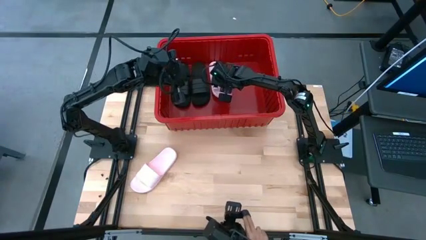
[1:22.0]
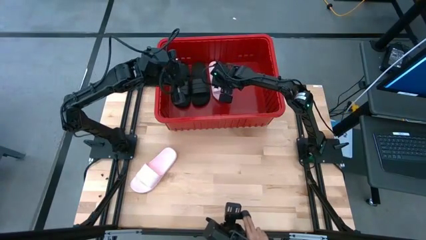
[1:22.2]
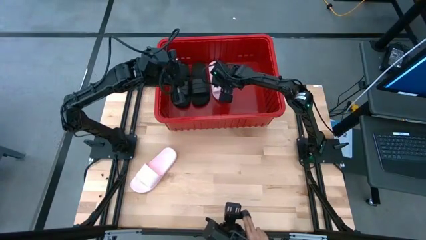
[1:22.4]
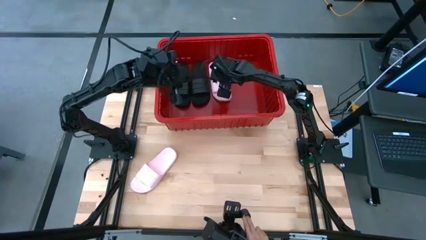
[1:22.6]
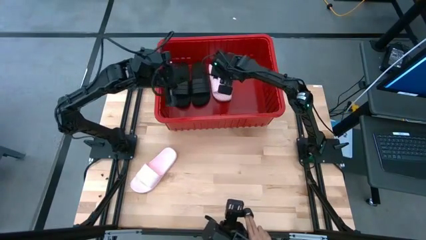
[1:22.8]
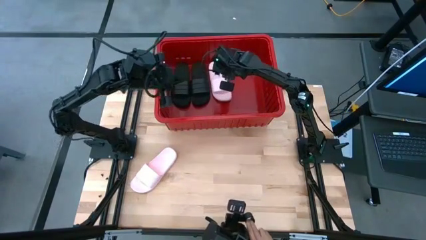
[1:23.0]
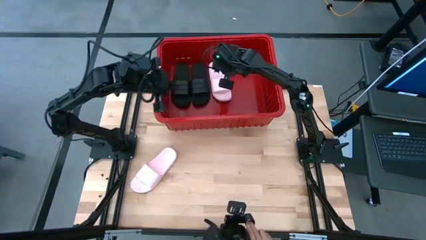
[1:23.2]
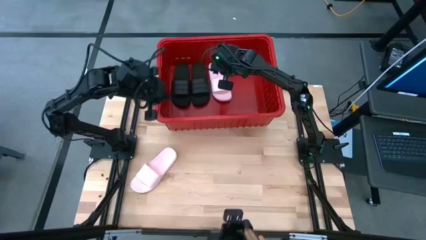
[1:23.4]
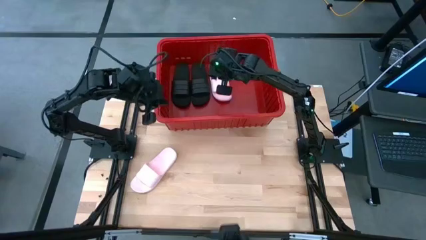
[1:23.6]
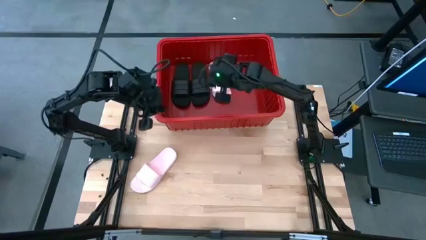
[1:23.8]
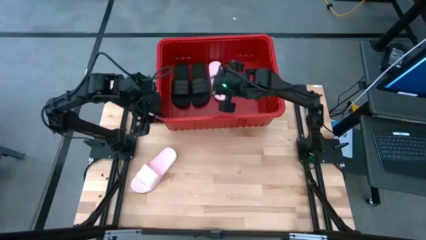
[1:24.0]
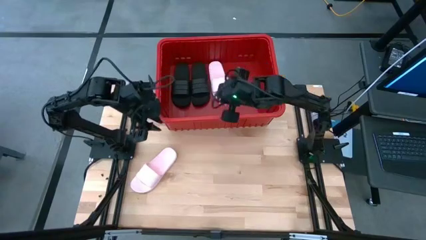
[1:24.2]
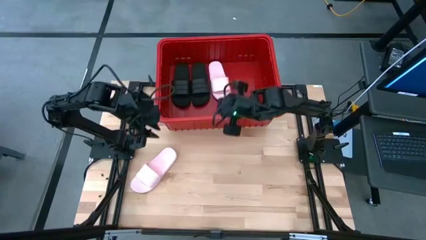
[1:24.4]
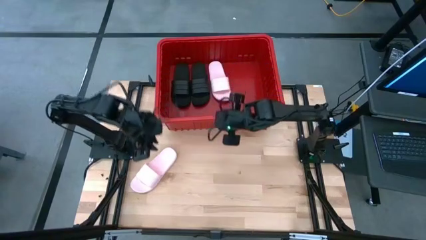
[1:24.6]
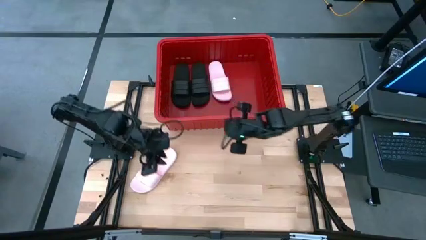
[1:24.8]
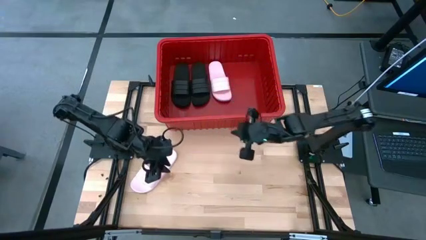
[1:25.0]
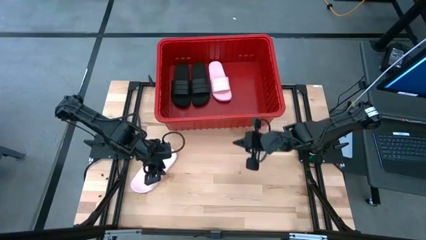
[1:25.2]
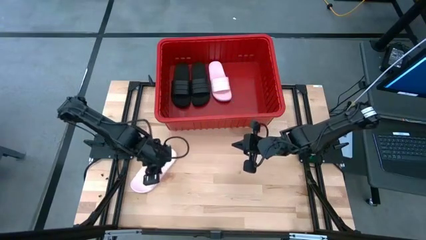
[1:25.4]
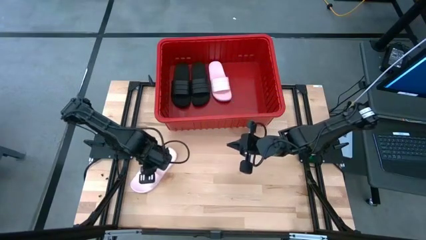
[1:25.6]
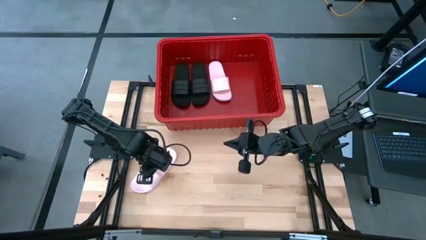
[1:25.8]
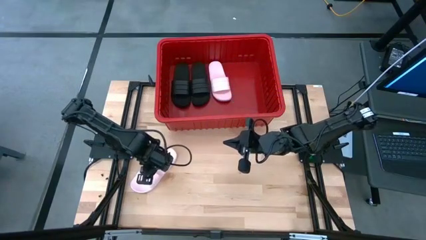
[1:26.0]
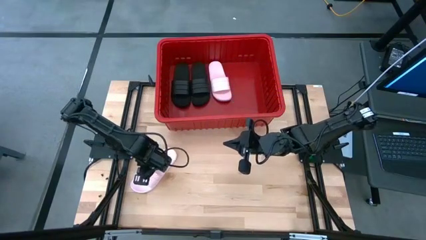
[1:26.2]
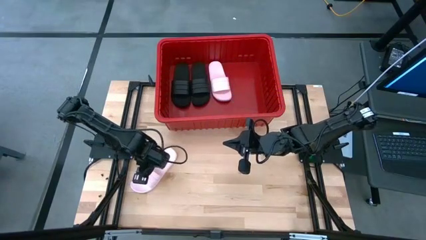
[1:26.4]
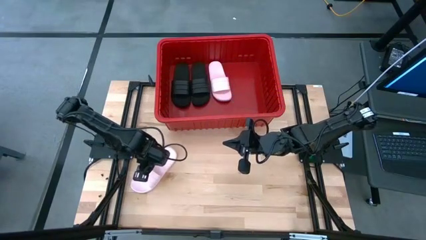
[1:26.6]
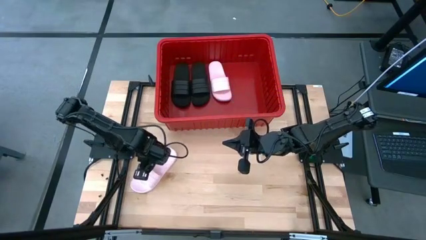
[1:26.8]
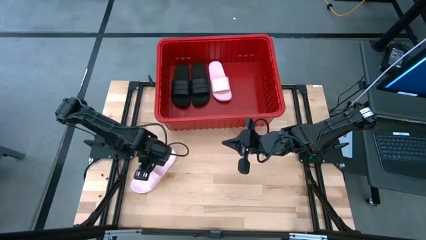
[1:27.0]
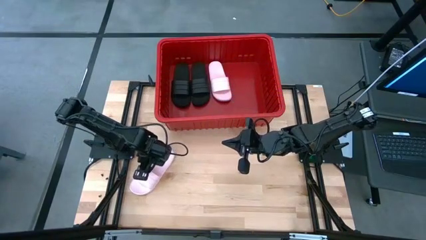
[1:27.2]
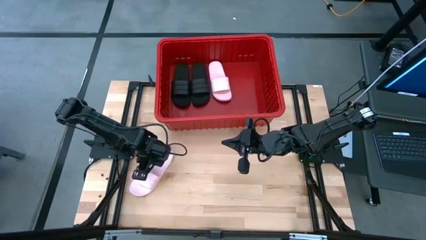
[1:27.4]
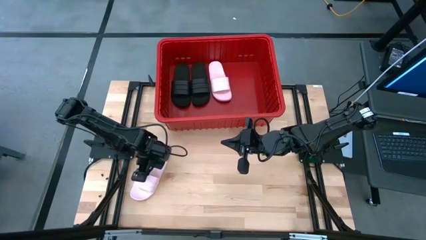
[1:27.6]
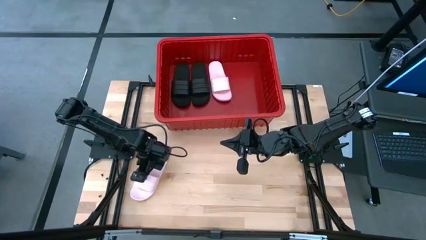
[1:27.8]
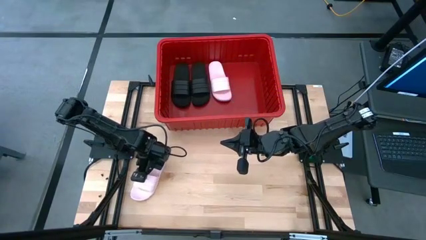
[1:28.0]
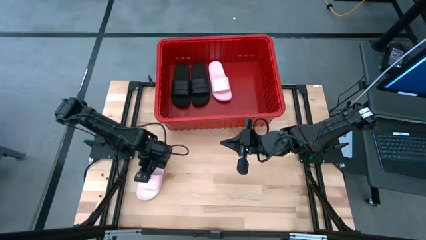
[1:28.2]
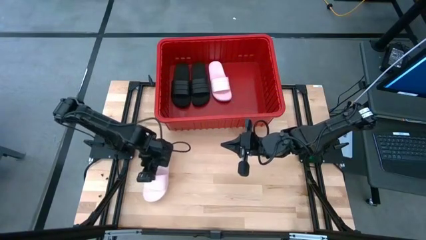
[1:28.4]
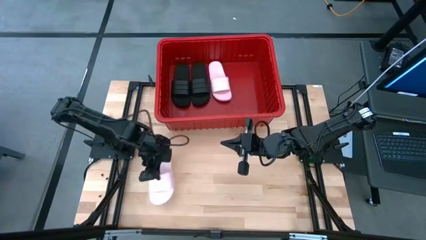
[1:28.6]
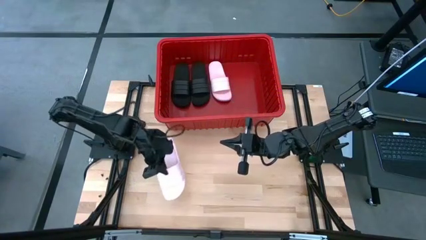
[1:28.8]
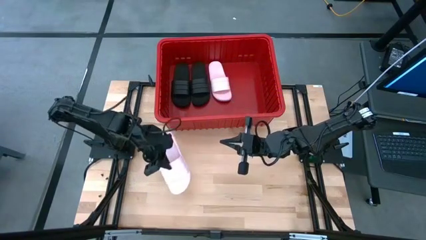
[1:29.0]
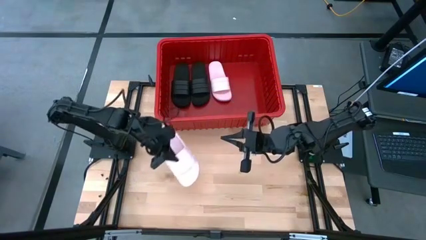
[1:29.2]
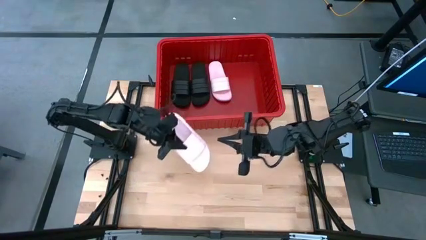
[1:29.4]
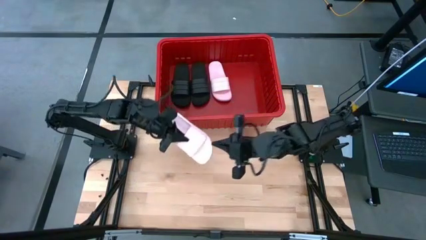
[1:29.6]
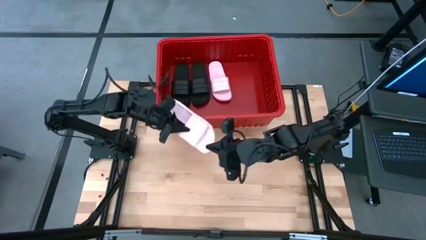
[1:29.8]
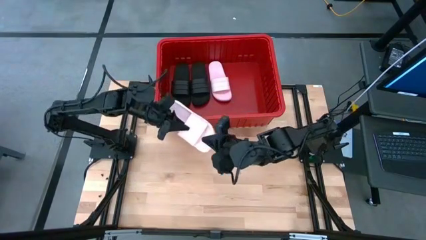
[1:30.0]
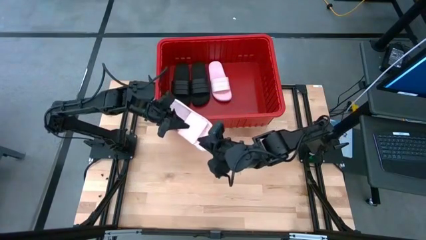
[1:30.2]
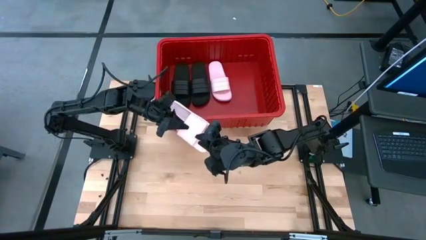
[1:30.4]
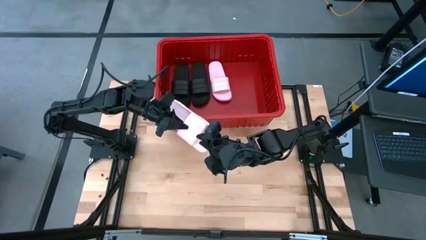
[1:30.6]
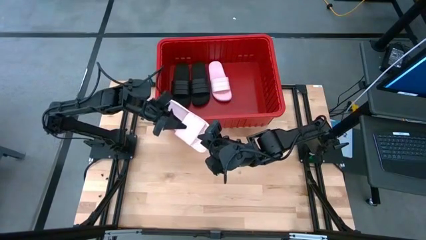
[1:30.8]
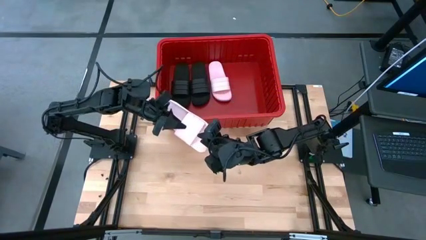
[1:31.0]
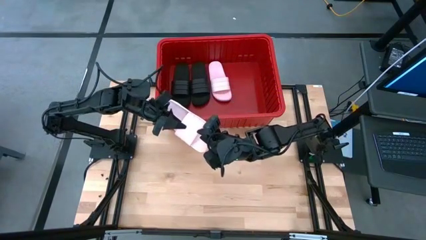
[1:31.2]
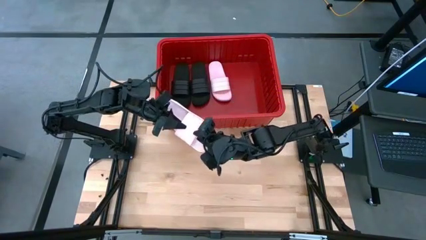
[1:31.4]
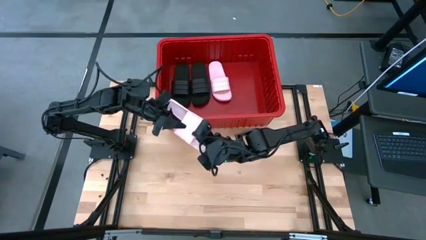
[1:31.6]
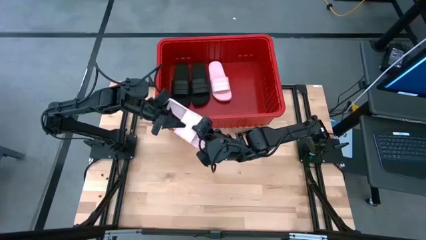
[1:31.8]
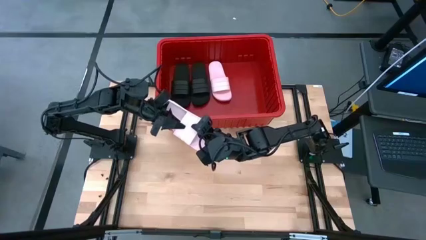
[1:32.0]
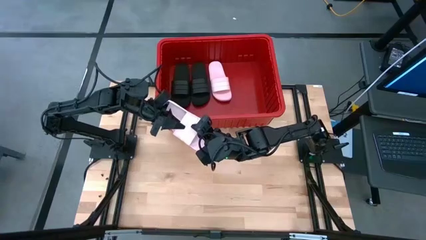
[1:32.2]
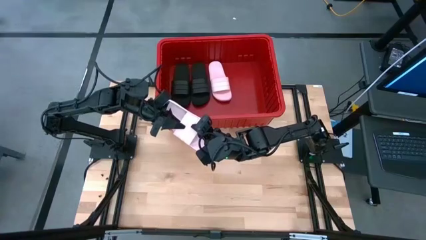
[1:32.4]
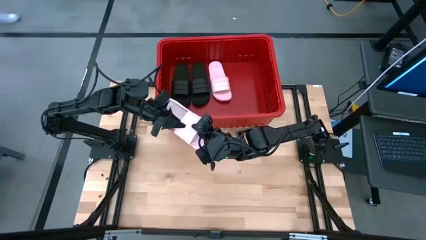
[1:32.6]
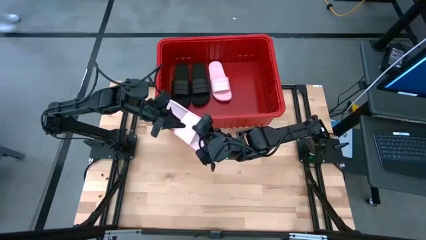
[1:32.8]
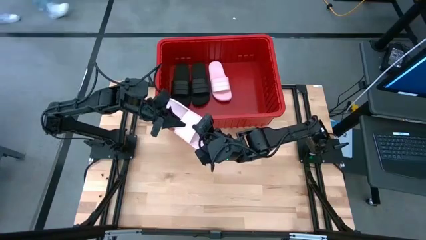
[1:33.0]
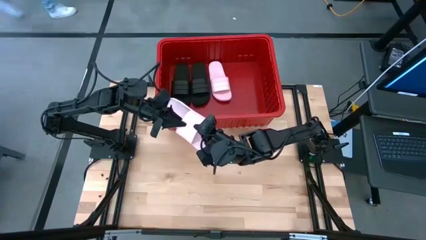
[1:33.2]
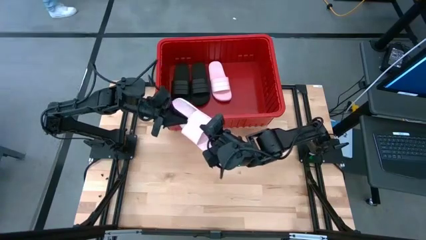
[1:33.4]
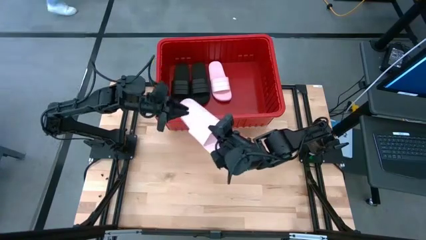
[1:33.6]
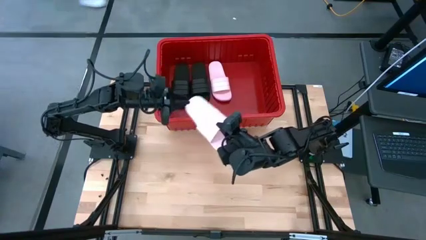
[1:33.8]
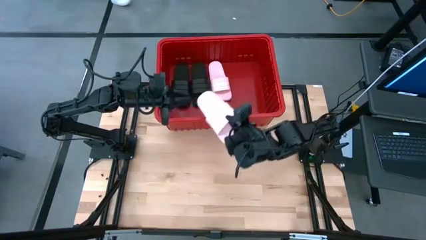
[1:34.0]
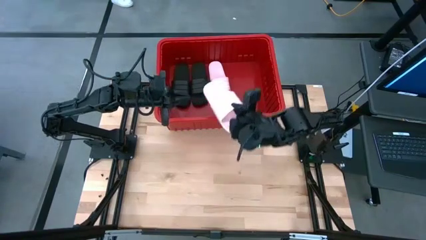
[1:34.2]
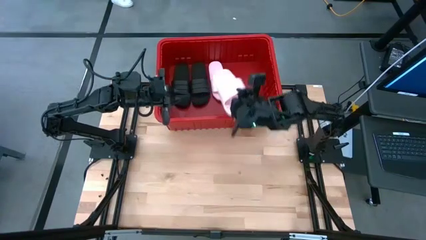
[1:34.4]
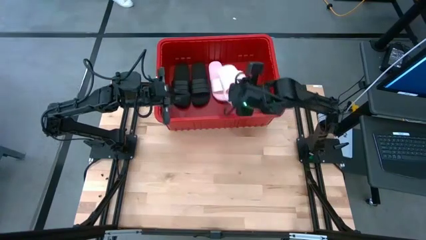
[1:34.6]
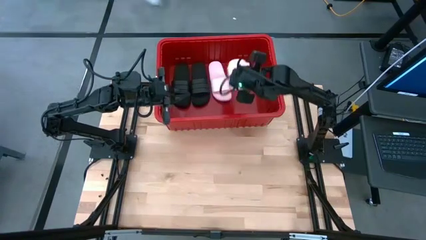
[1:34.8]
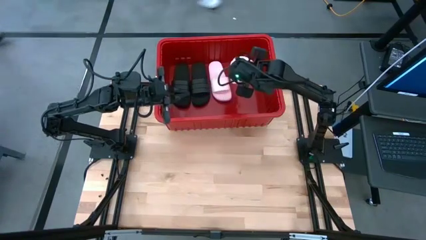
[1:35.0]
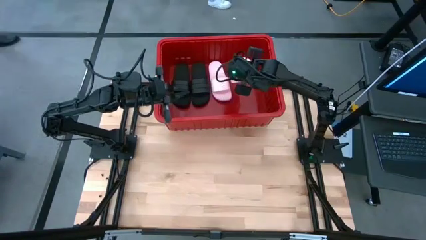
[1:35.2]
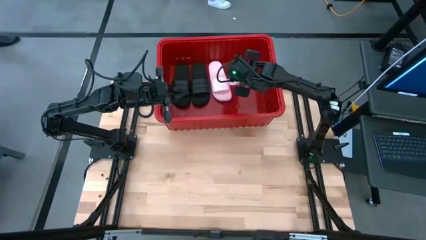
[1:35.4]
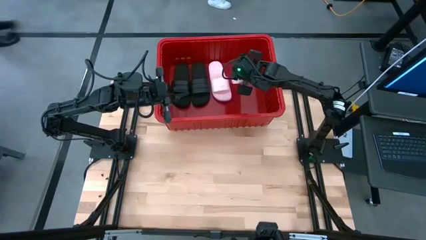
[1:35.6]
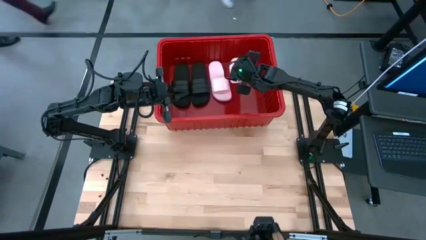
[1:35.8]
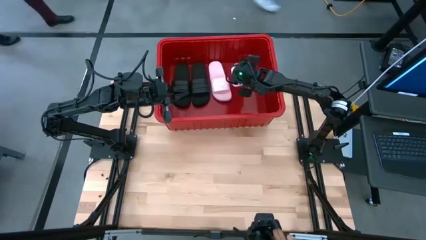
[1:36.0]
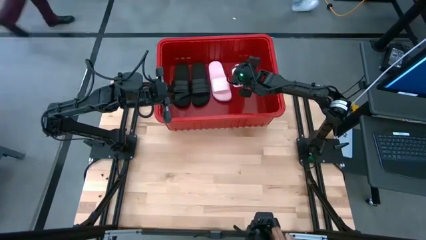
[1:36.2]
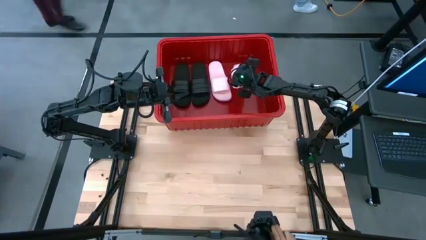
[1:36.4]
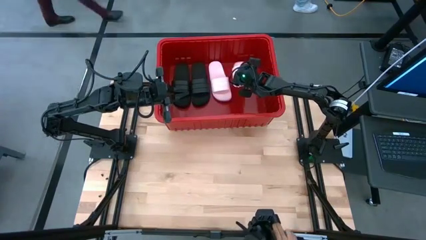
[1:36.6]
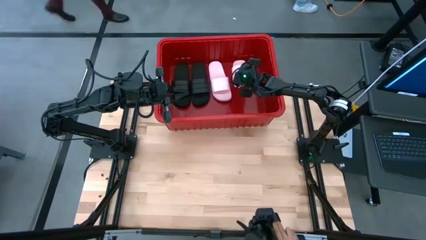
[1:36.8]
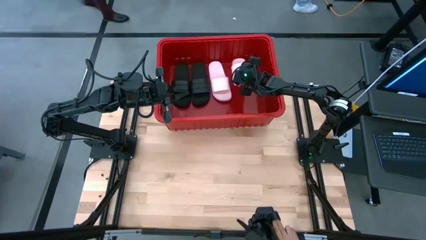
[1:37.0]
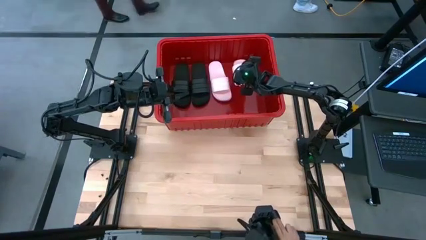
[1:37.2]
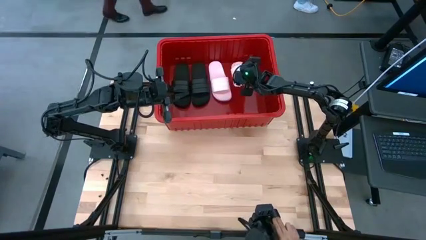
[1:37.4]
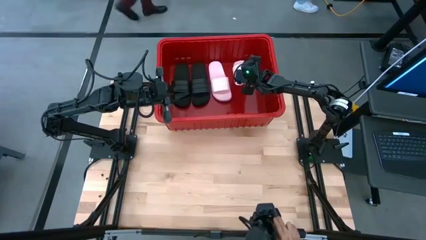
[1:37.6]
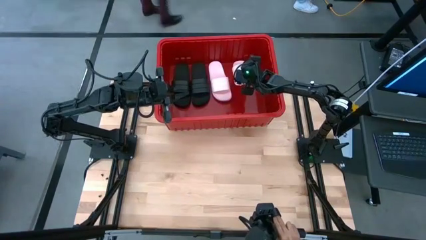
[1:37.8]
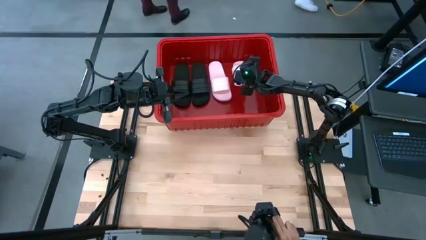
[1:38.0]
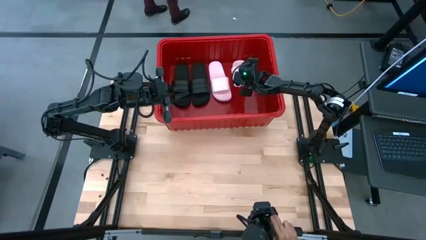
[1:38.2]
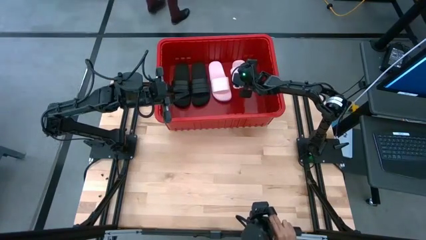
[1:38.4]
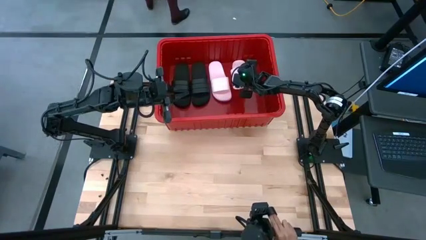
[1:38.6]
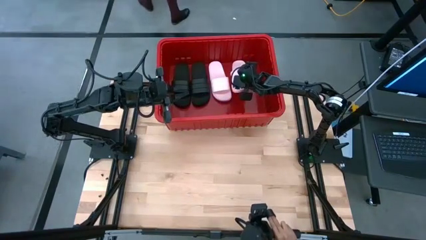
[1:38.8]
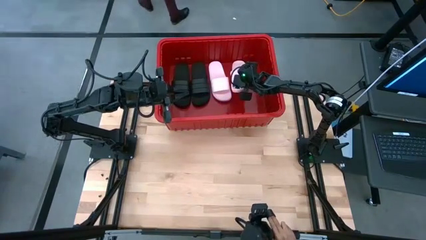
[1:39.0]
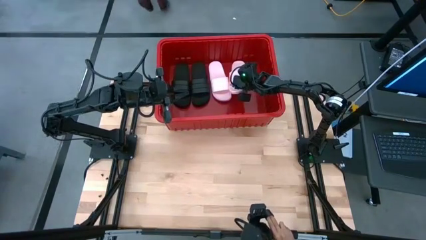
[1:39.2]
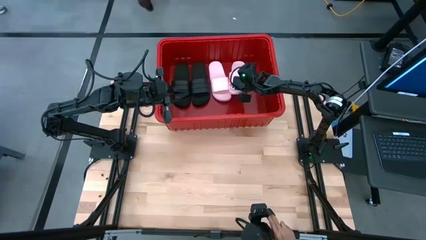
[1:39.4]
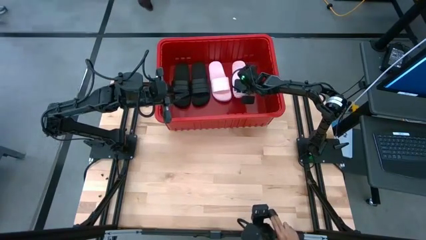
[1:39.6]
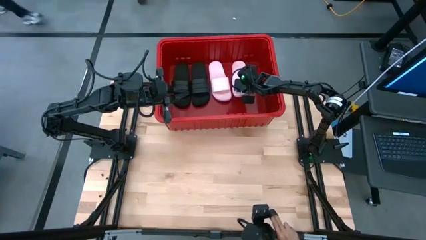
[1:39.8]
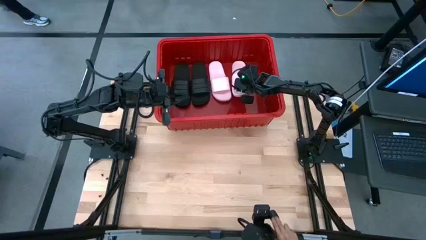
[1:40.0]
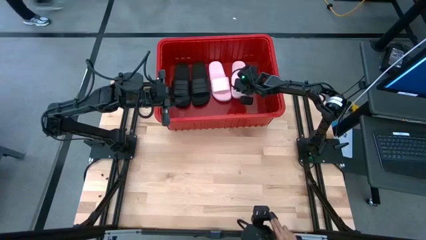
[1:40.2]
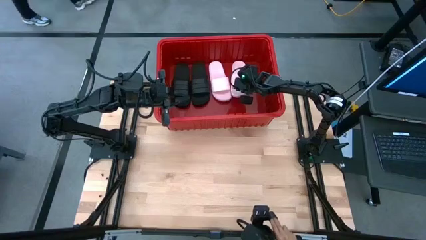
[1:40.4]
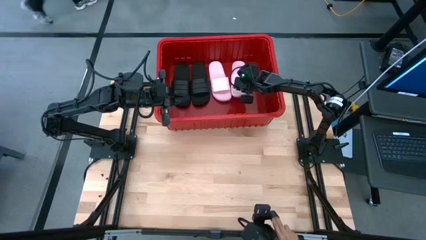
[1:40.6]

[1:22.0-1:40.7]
Task: Pick and place slides into bin
Put the pink slides into the red bin
